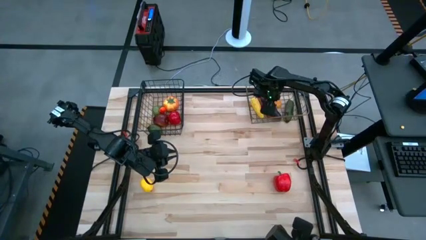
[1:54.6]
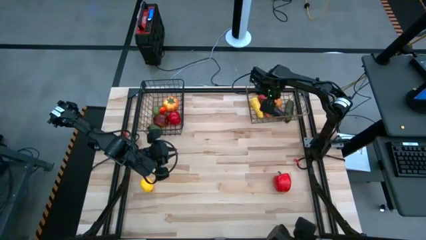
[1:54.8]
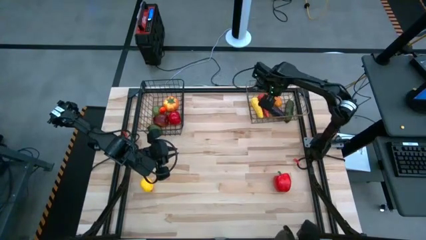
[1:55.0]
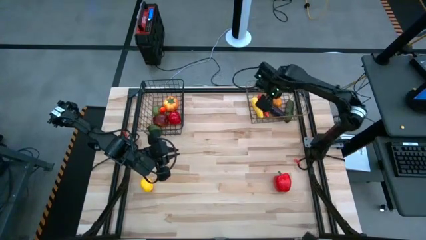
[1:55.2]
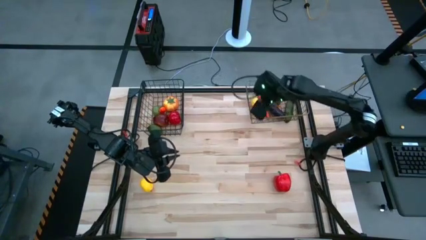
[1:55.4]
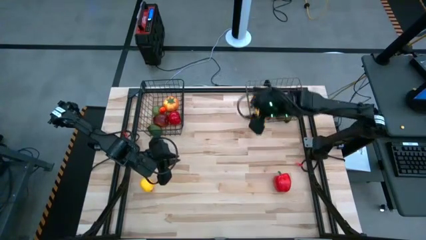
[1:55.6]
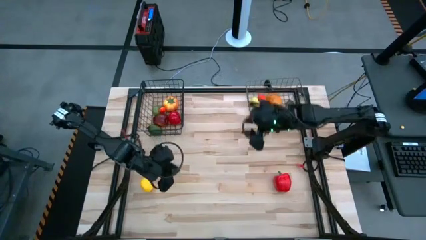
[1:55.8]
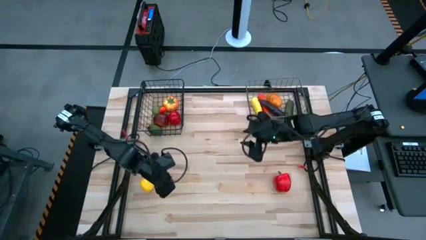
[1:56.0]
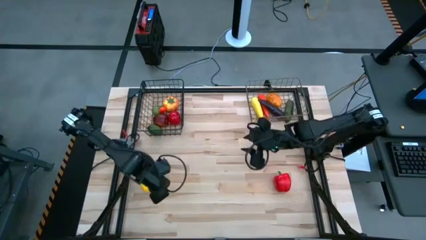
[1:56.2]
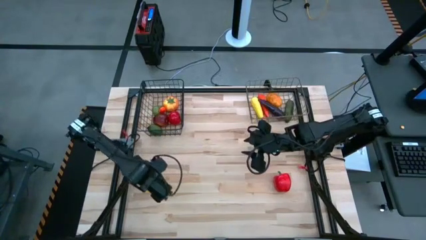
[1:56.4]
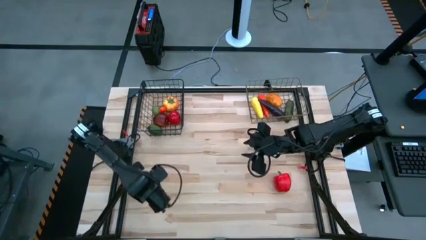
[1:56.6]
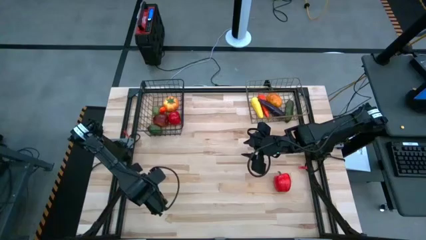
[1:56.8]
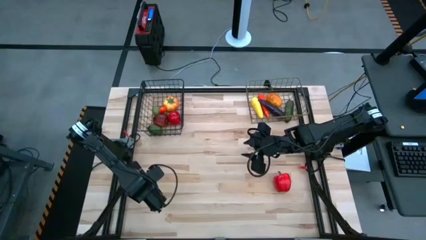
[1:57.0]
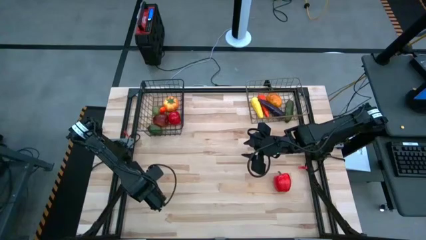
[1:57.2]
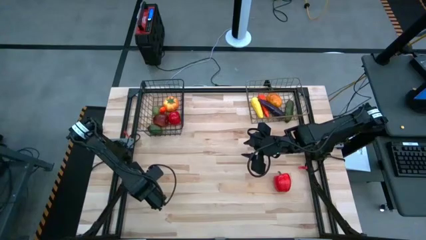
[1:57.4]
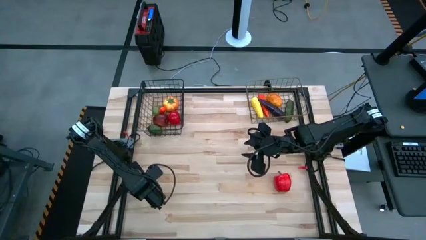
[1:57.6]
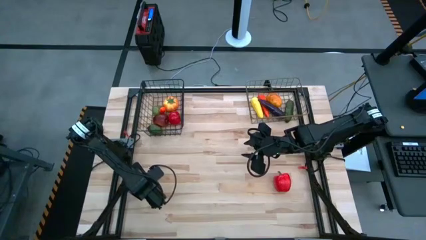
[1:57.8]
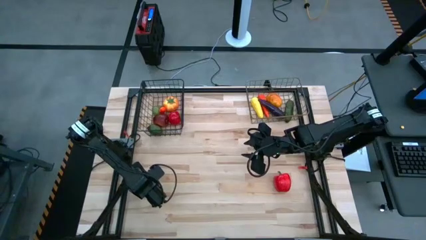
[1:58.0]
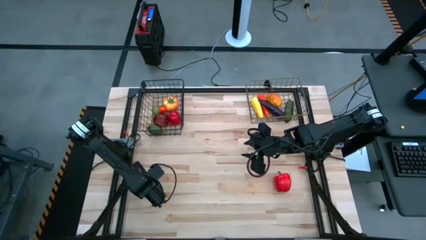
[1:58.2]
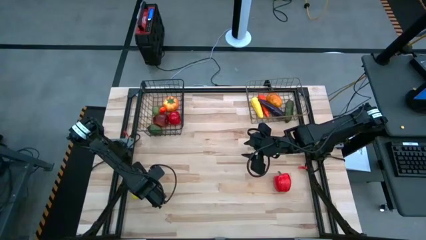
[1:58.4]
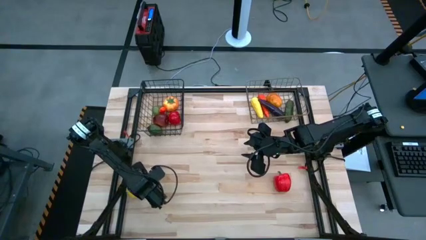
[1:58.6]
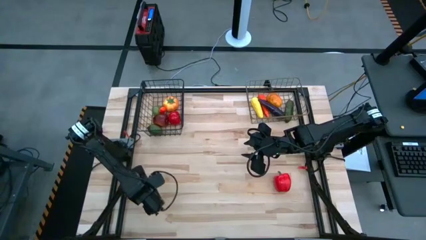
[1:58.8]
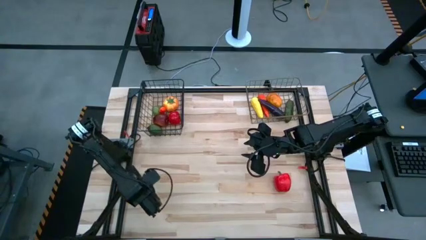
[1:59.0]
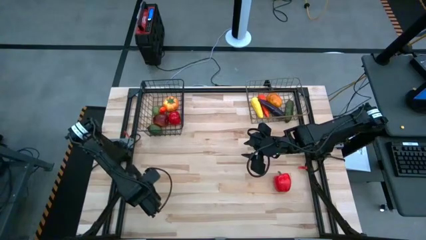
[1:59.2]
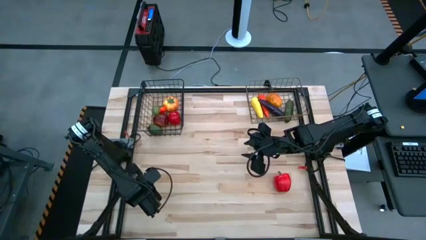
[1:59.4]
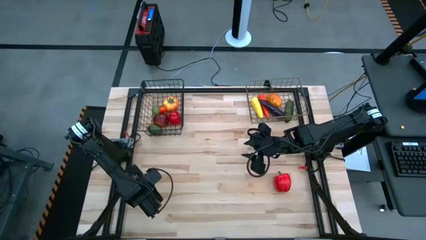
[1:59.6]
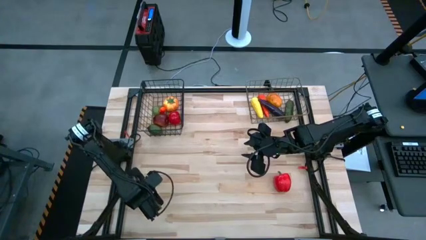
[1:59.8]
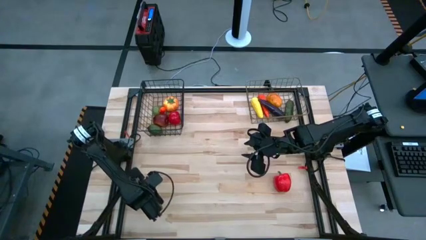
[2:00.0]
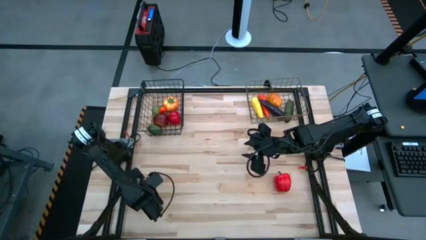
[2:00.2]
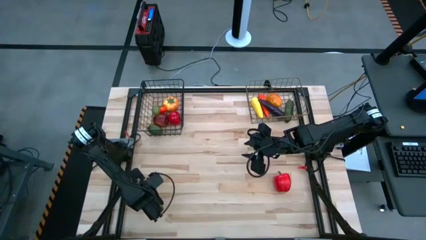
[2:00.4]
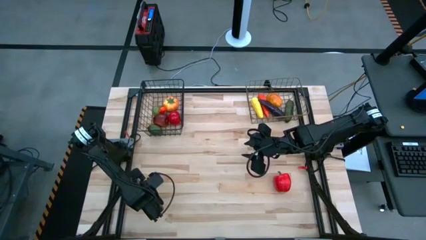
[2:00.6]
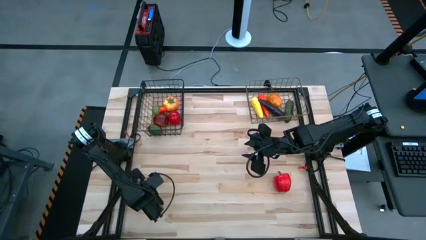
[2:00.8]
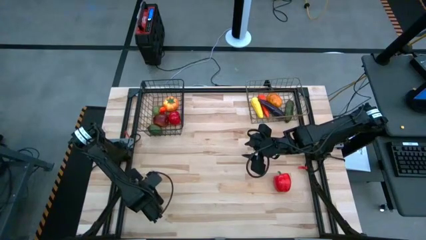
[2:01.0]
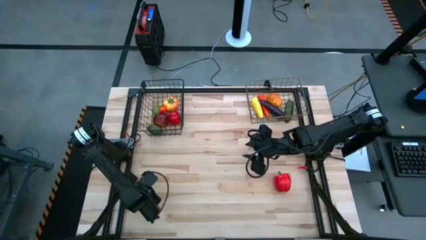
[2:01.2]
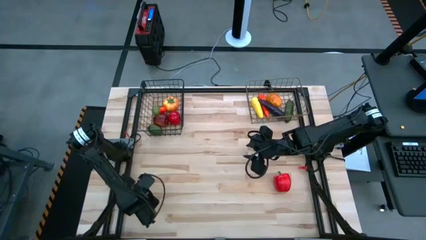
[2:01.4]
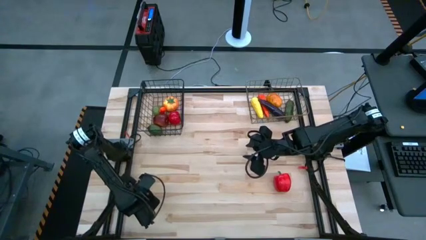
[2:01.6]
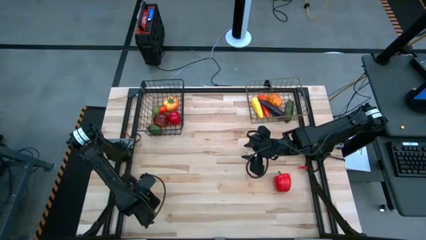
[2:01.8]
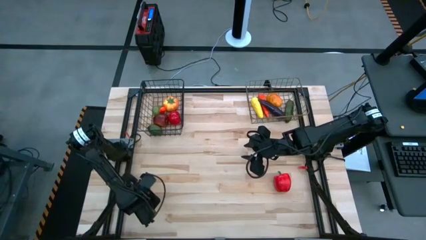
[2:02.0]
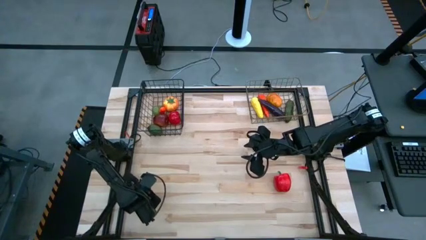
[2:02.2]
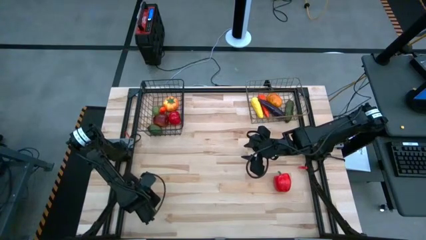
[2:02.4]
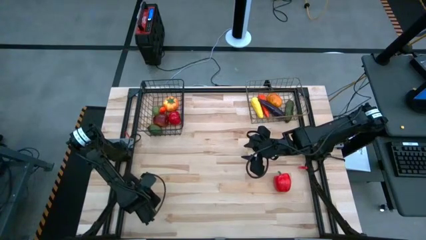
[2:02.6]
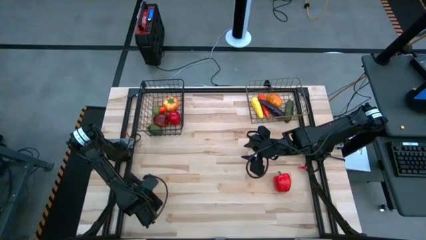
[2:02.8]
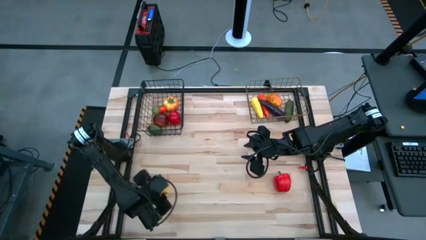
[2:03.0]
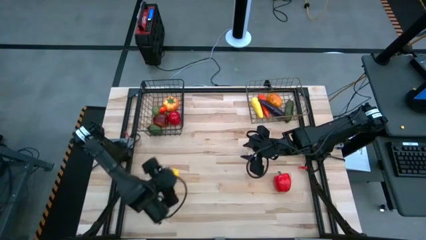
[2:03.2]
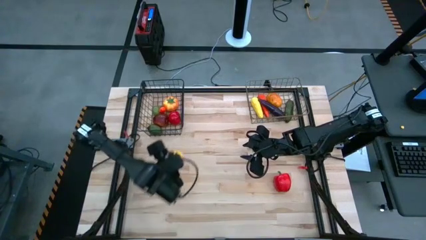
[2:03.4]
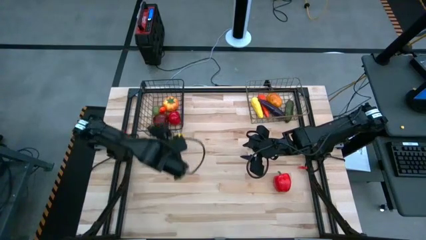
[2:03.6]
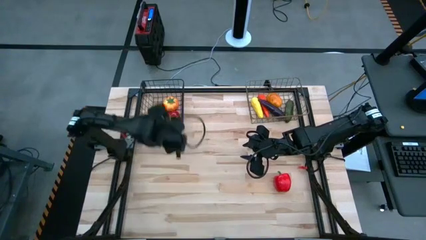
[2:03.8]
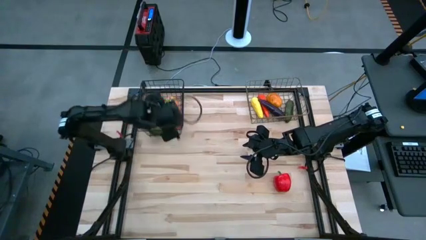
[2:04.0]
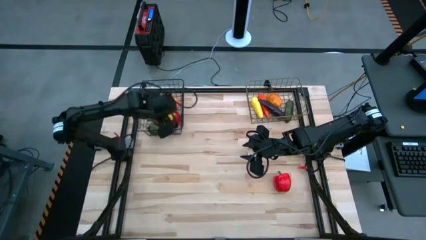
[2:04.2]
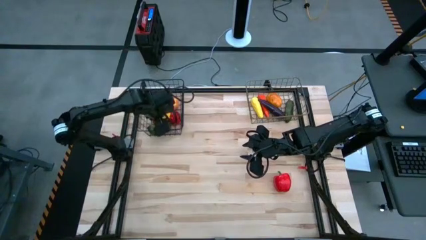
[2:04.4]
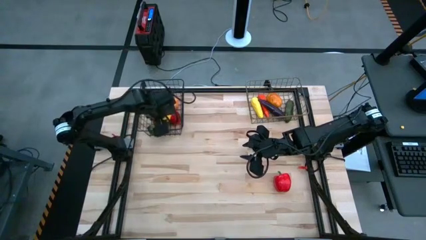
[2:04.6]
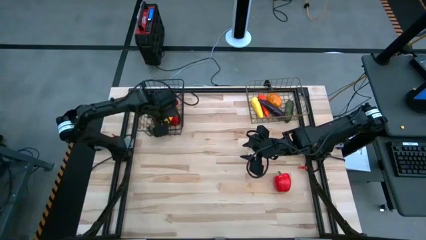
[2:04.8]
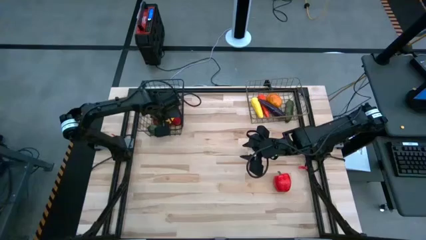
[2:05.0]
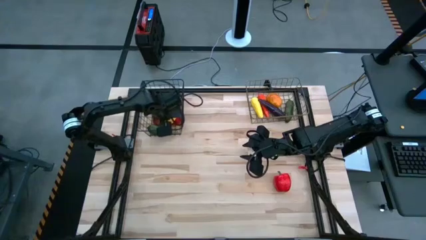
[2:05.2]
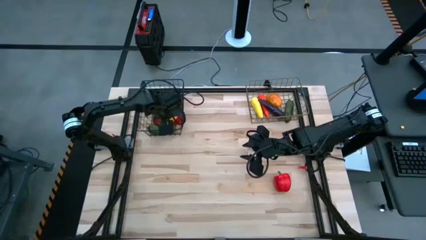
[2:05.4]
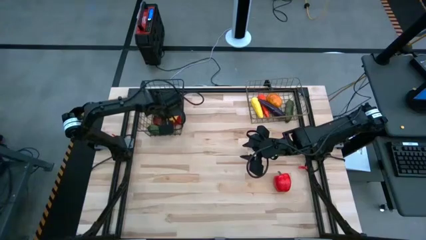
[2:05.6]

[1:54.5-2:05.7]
Task: Sort produce into baskets
Put the lemon into the left wire basket

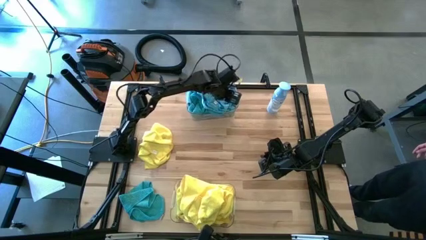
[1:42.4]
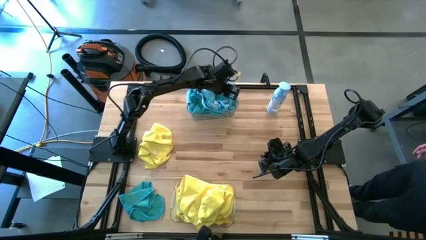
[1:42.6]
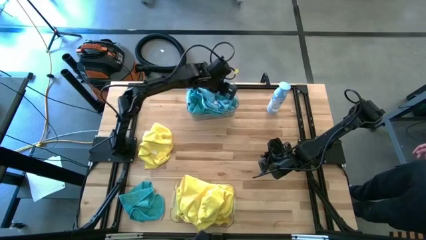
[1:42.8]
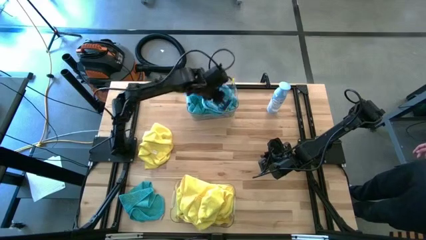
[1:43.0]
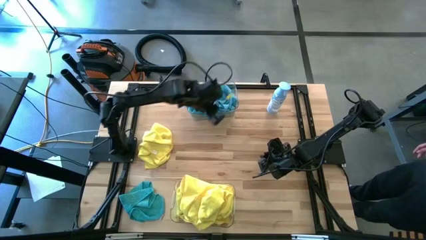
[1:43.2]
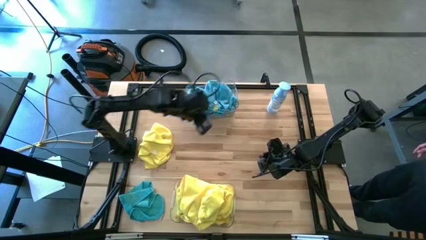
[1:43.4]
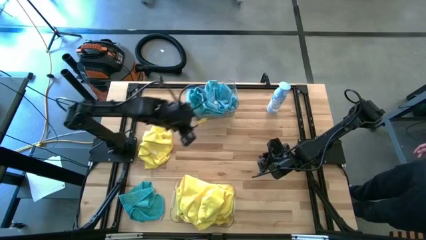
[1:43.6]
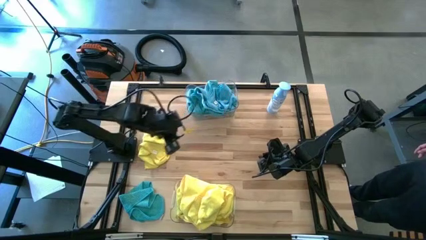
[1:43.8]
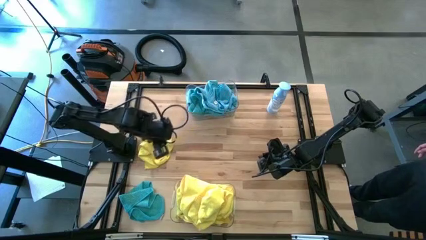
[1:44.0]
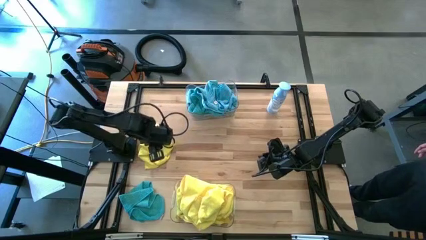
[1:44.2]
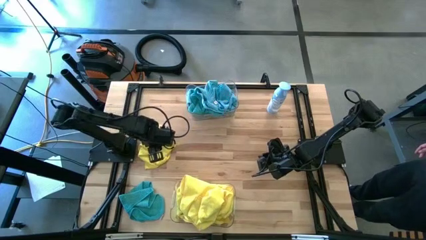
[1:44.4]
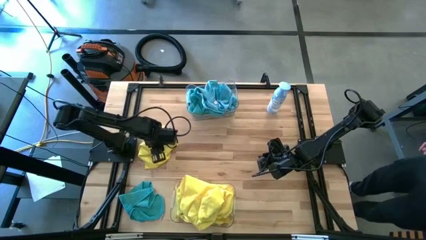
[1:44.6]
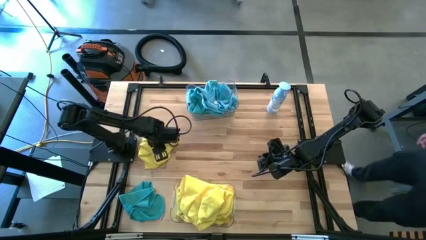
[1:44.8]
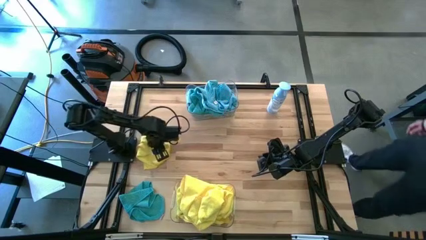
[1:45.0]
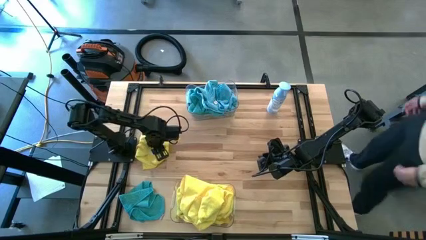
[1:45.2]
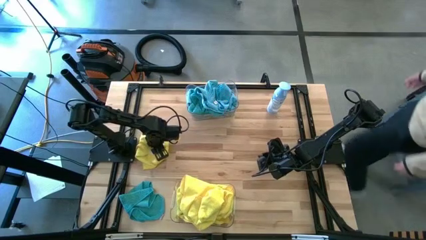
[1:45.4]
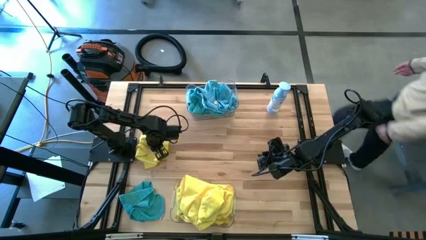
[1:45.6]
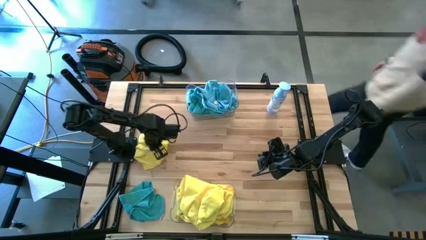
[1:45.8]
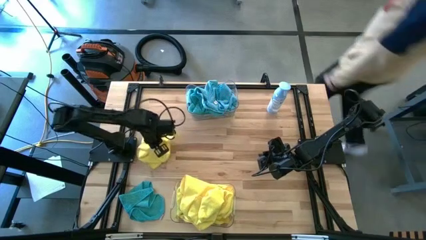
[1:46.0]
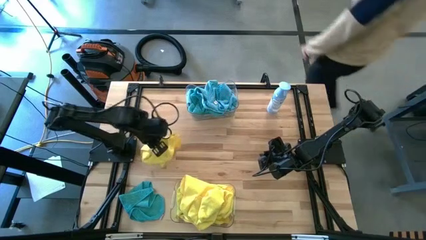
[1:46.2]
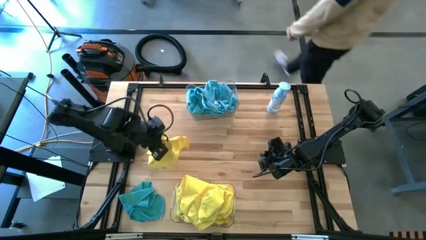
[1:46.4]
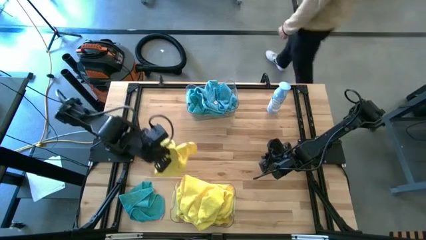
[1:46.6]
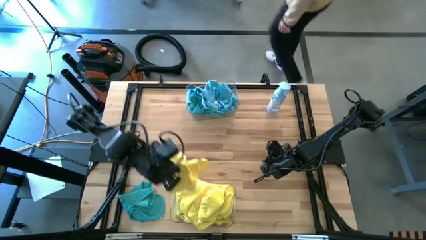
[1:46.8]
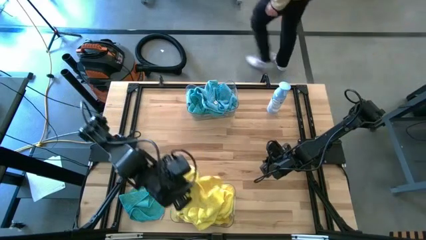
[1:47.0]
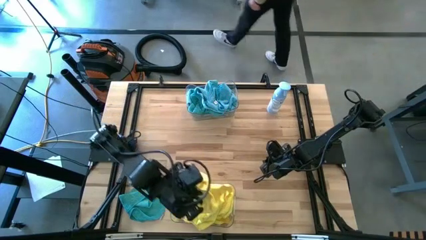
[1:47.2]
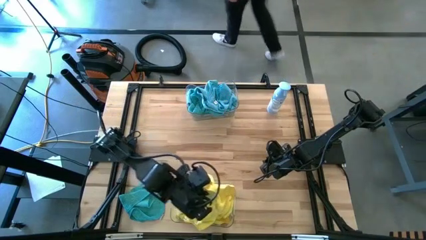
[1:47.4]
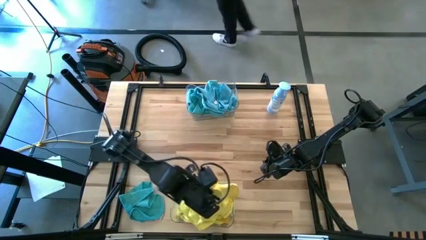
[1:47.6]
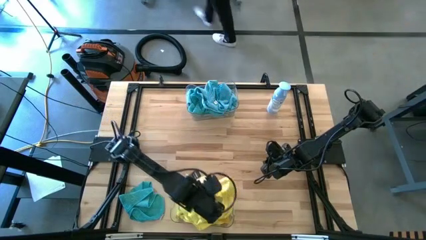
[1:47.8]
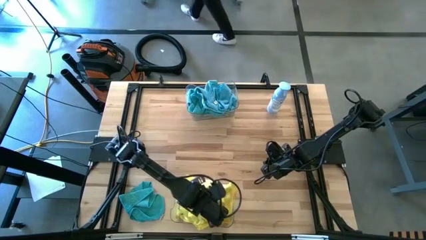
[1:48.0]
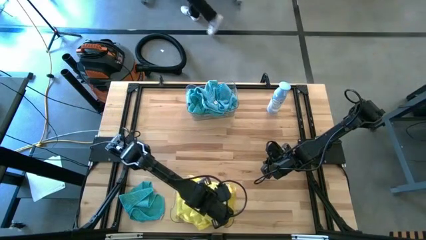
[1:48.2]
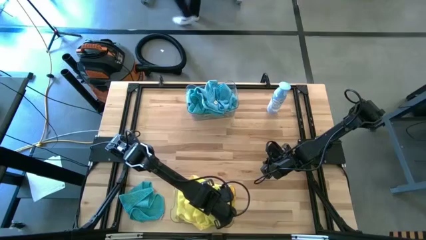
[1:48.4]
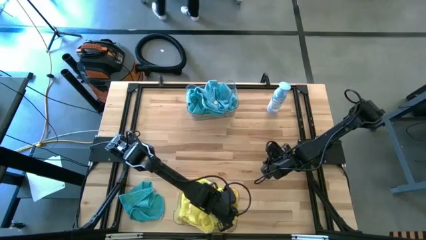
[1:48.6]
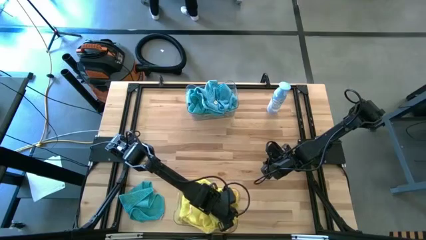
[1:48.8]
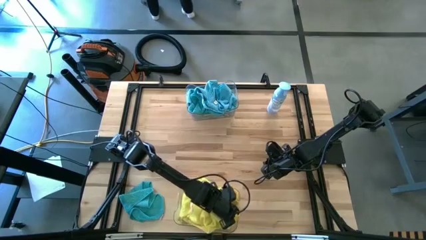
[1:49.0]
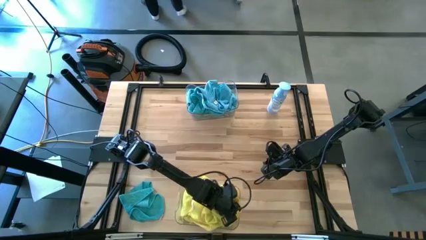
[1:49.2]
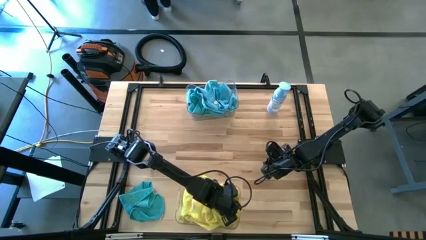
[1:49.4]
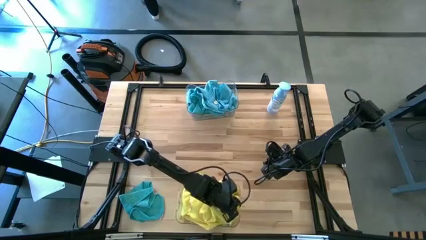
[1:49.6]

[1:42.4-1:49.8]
Task: Sort microfiber towel by color & place in baskets
Put the yellow microfiber towel into the bottom transparent bin
